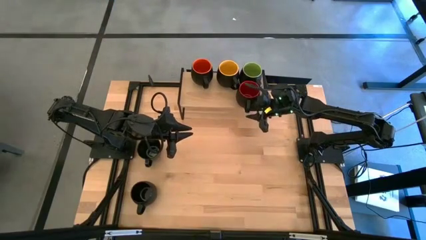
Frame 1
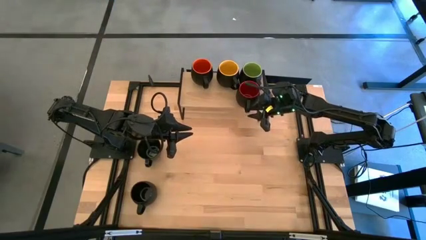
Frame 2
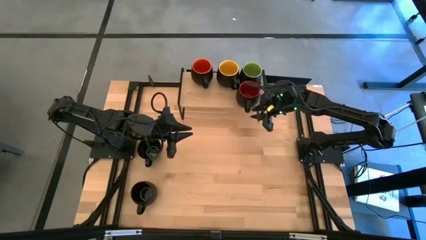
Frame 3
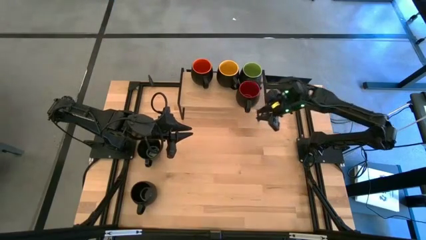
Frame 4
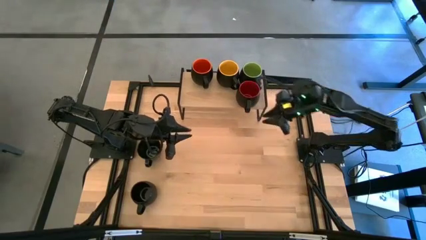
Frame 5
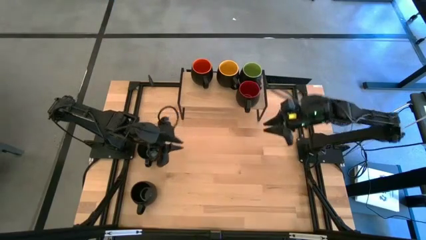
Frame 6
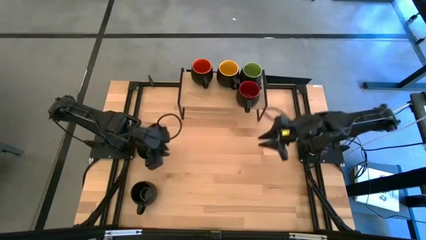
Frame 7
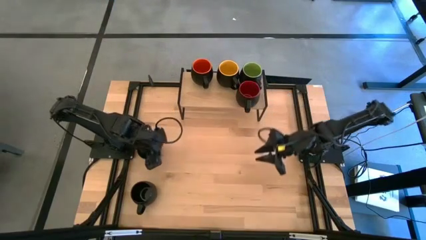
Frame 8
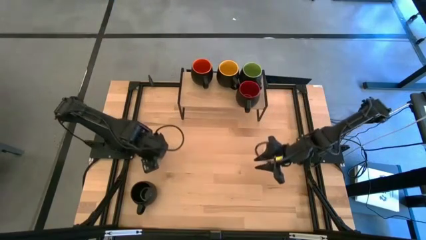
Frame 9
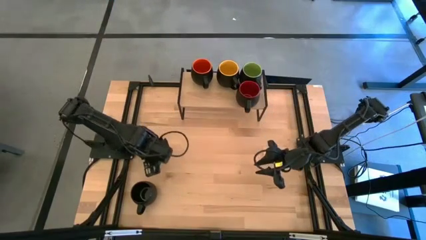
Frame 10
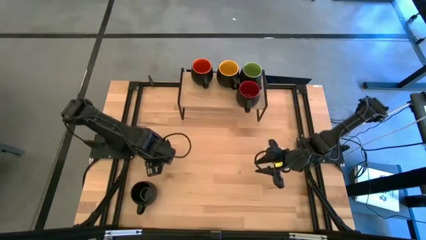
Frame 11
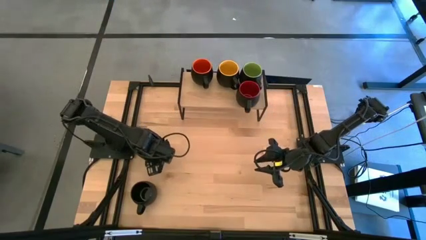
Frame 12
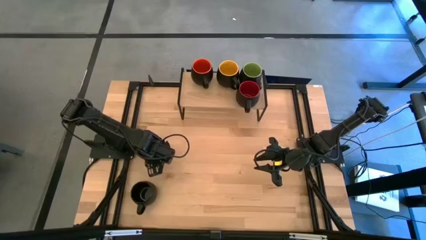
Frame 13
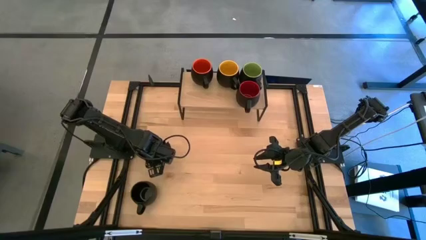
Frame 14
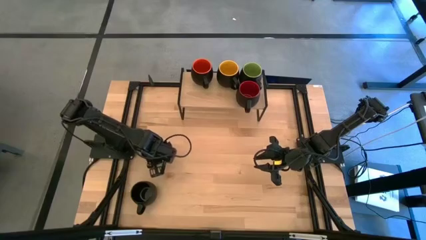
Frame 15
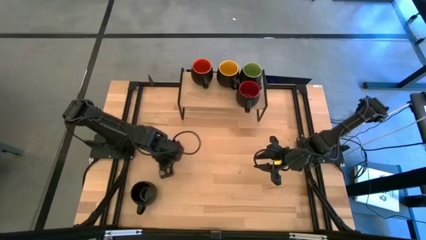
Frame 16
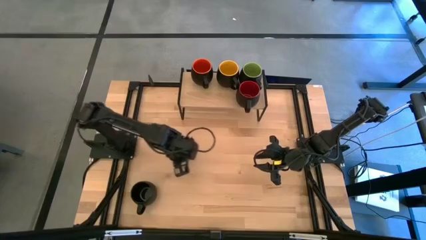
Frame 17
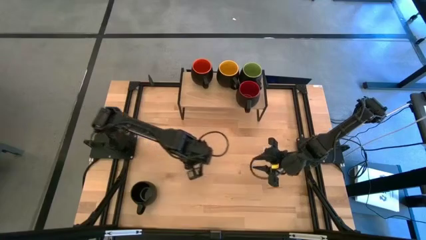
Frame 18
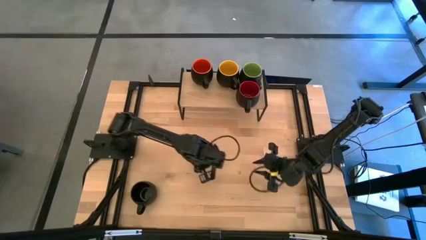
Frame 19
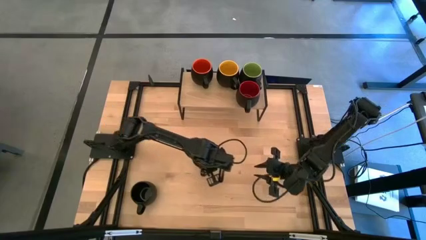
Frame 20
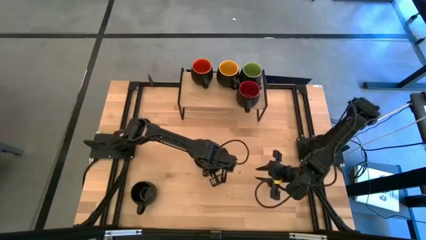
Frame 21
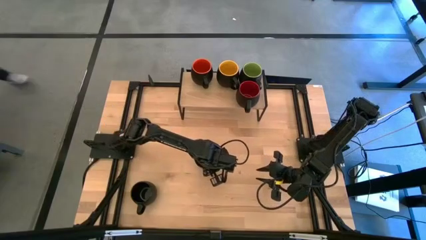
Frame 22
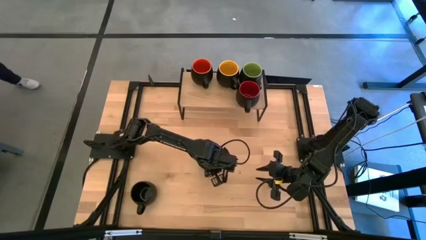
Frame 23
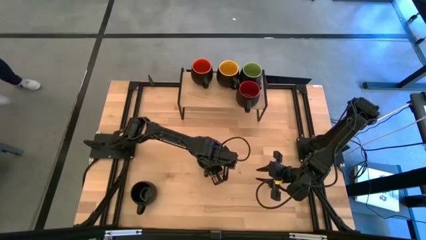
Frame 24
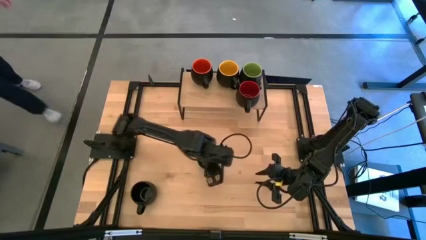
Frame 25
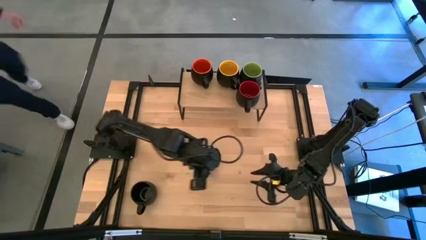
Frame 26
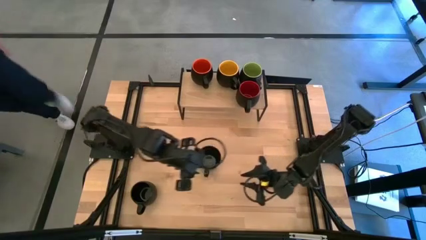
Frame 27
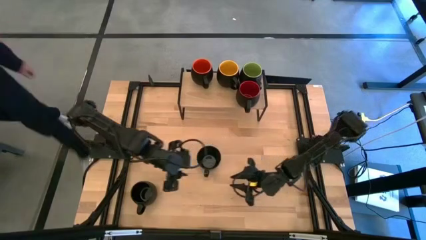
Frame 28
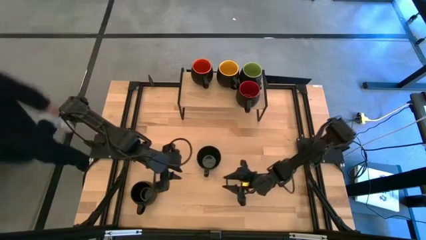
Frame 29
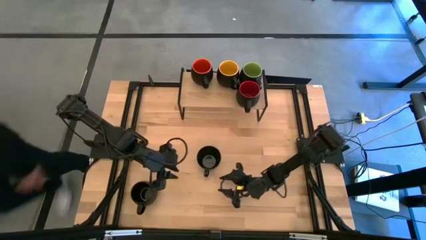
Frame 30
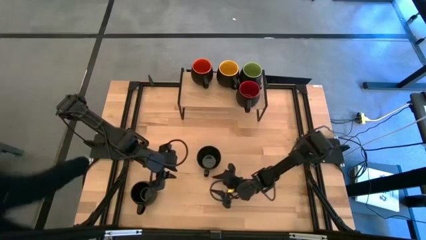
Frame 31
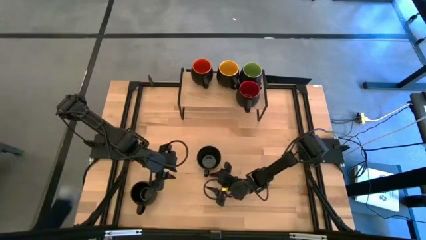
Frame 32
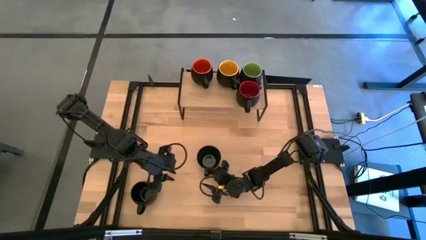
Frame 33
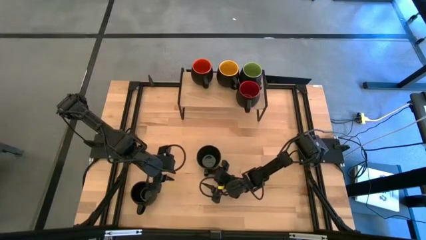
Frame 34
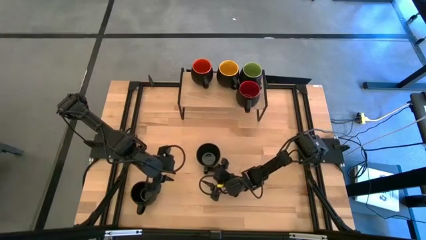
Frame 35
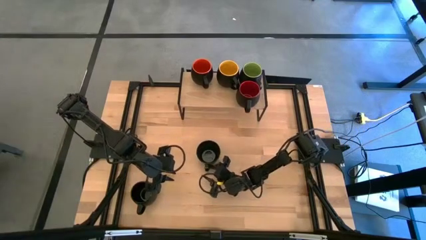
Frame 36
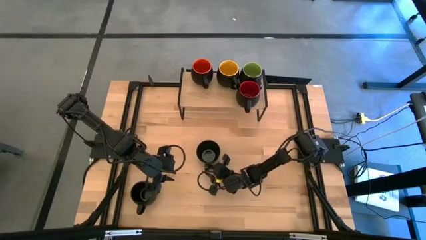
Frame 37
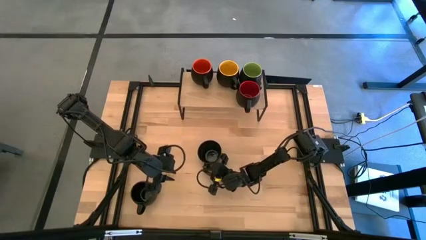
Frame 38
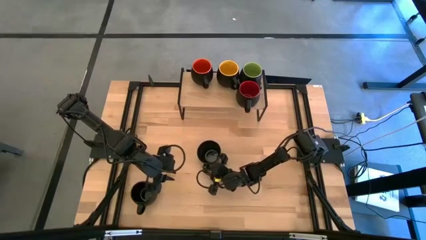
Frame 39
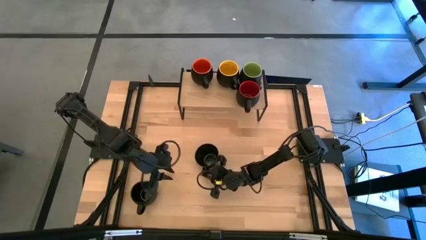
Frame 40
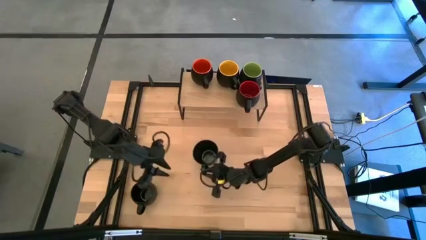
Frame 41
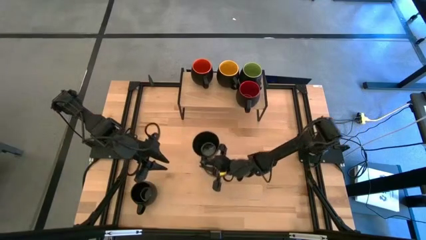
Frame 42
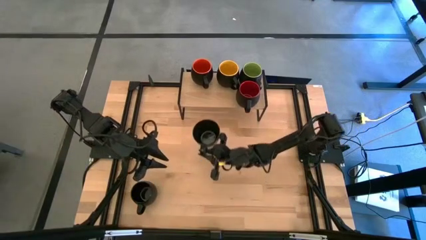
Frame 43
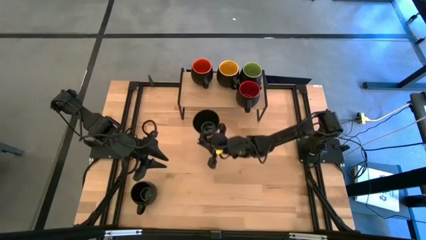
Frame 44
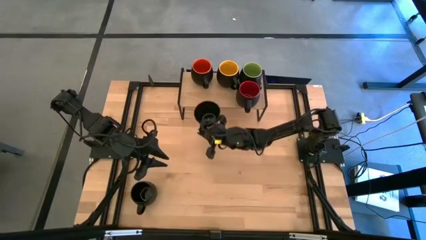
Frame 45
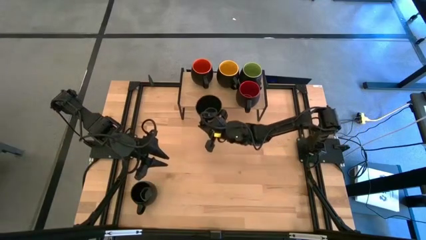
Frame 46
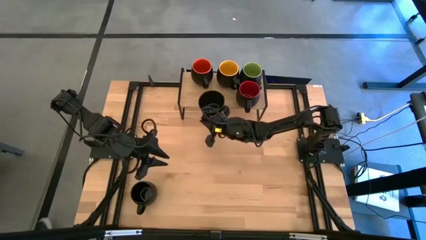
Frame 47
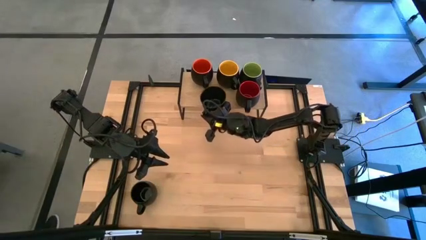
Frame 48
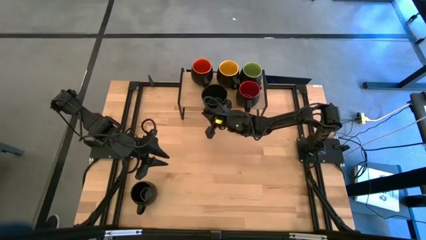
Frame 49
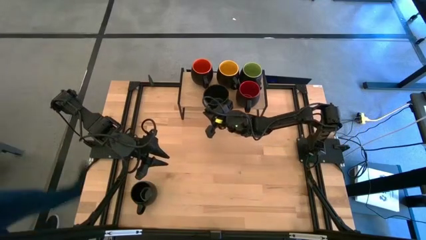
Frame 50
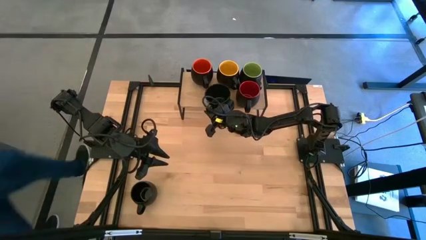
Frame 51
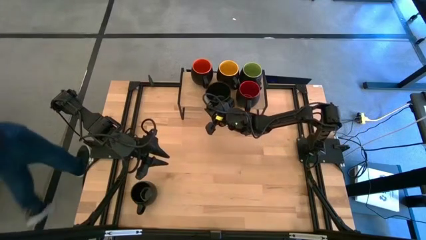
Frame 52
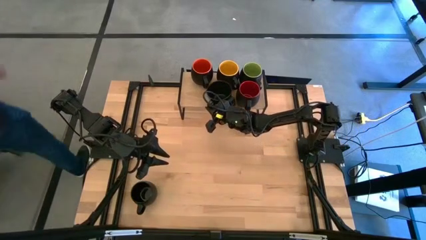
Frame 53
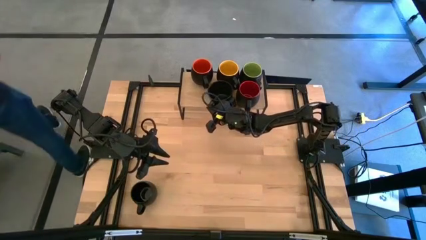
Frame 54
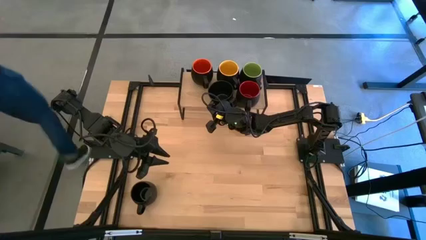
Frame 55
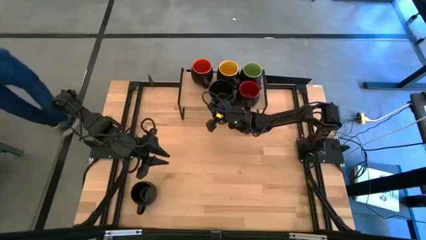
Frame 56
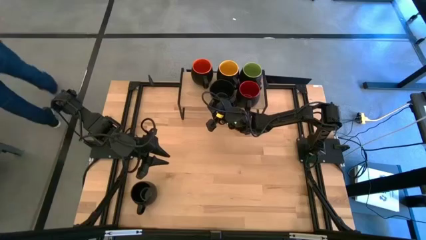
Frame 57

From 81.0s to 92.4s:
Task: Place coffee mugs
Put the top black mug on the shelf

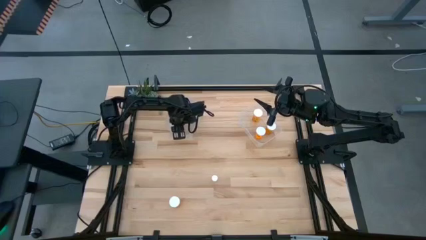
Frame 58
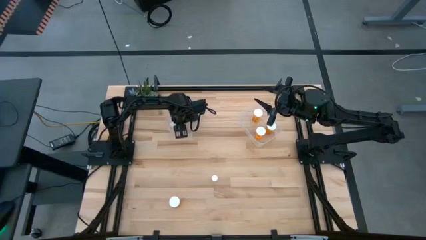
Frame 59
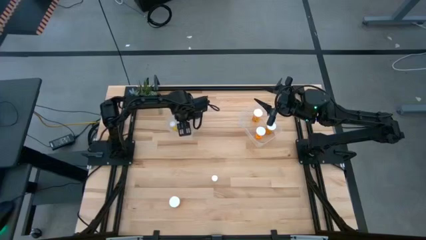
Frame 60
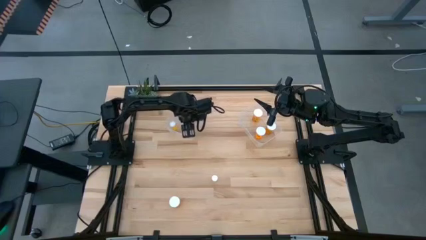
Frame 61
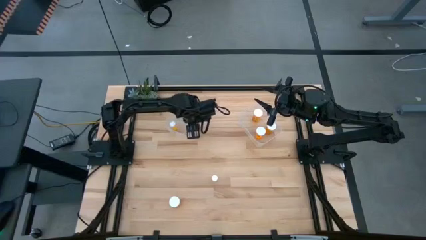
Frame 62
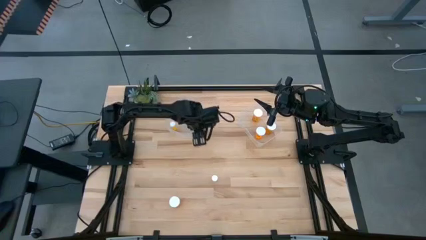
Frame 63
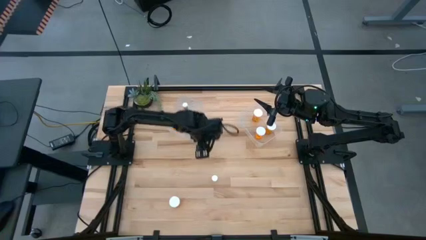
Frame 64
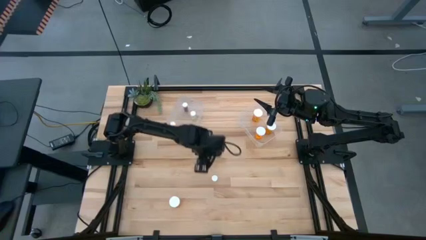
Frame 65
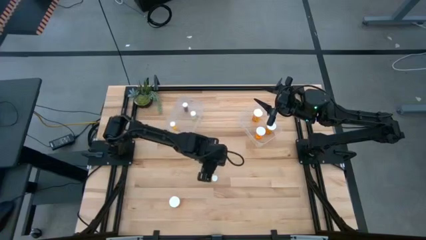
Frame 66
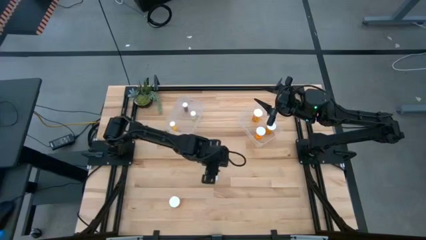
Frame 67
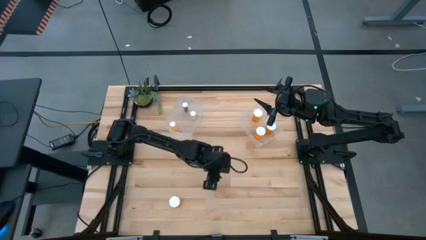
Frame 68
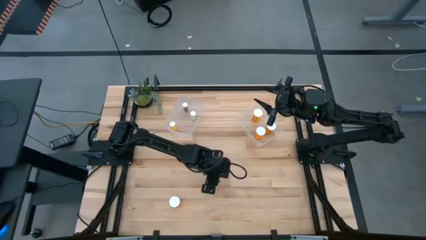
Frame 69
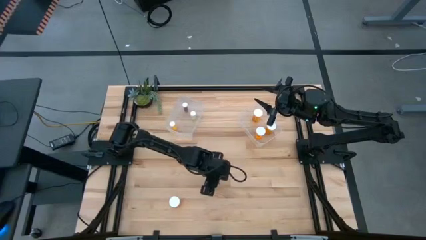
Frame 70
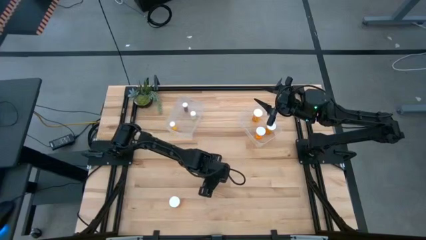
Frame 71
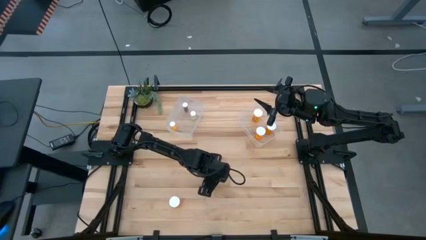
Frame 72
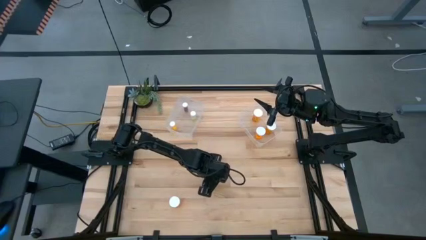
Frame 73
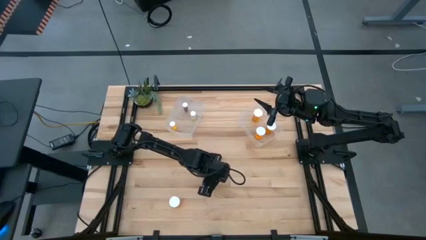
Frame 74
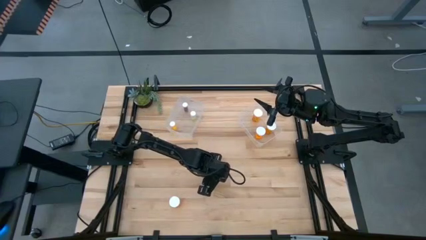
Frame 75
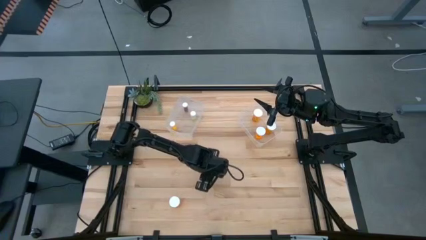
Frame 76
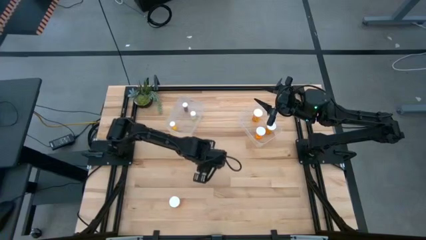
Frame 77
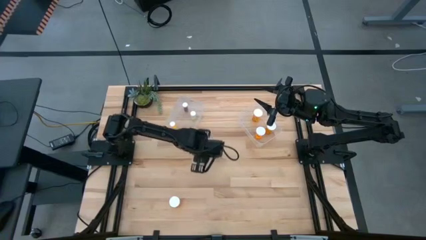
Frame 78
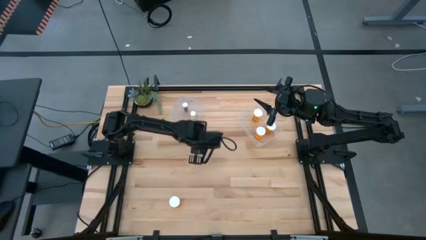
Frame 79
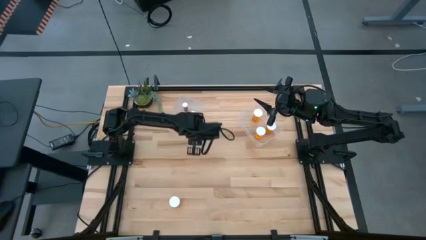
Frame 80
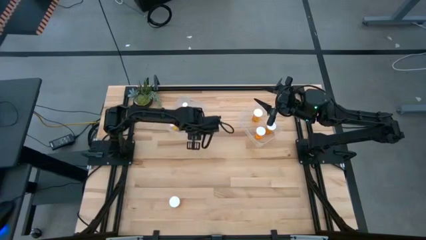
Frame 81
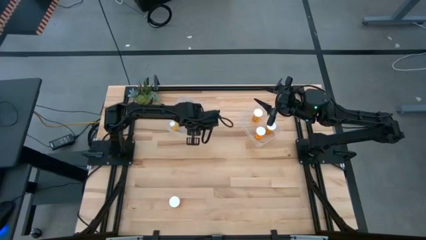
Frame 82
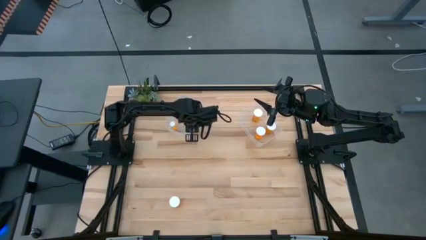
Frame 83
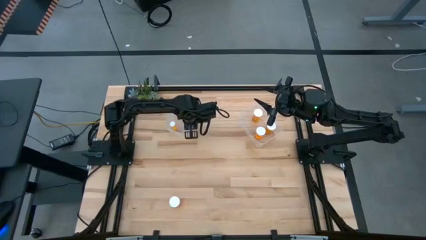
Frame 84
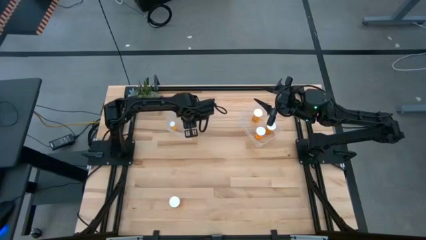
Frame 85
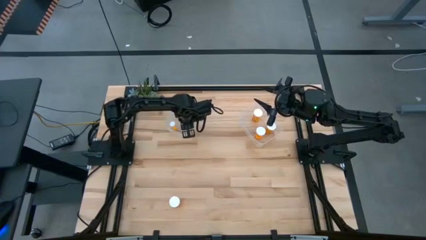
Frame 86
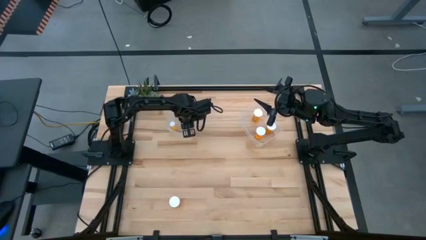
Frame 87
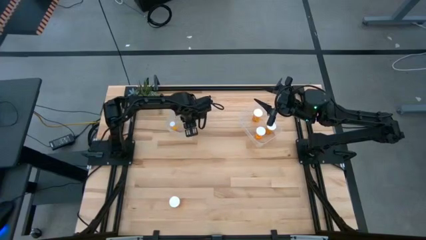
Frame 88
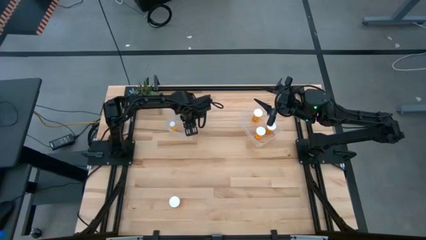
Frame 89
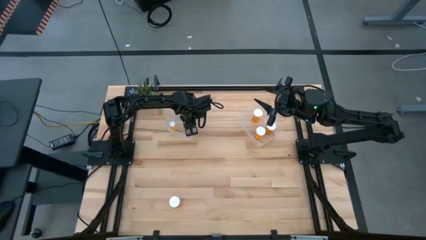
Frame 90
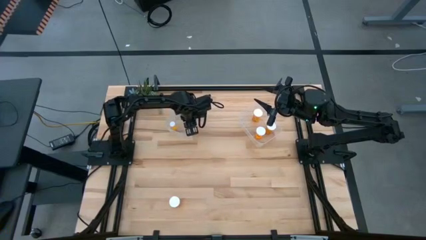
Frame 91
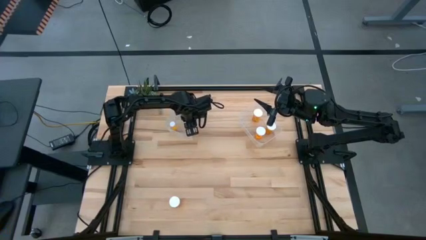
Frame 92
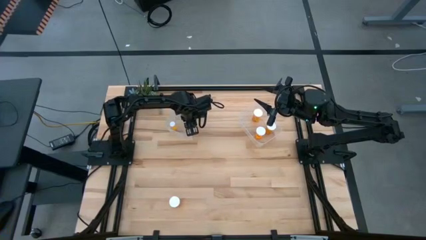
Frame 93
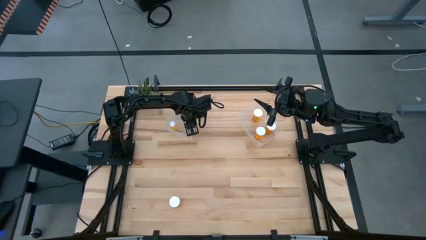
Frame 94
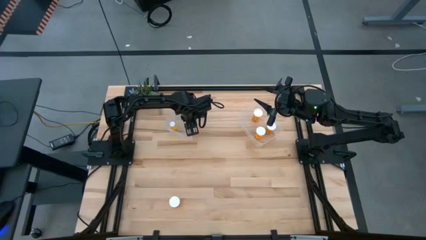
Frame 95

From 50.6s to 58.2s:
Task: Pick and place medicine bottles into bin by pill shape (circle, oval)
Put the small yellow pill bottle into the left transparent bin
